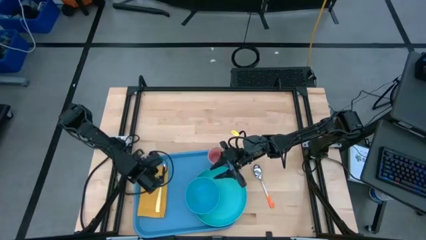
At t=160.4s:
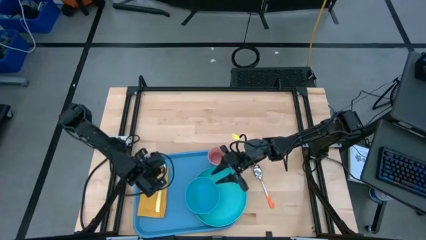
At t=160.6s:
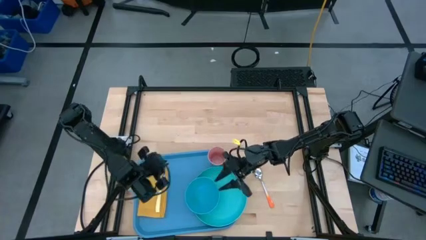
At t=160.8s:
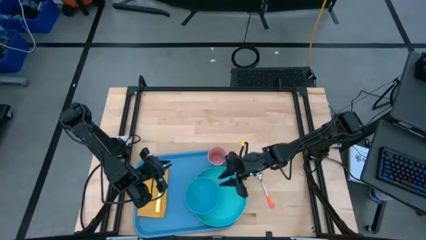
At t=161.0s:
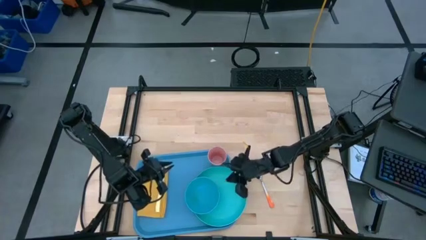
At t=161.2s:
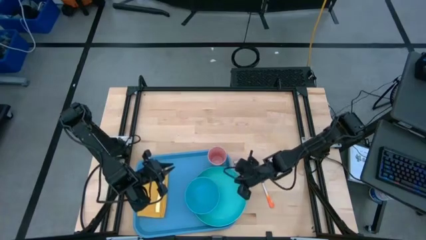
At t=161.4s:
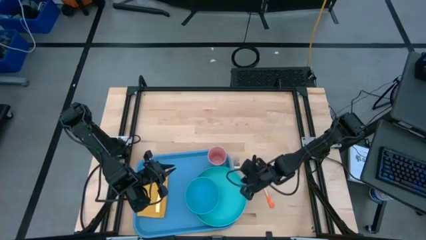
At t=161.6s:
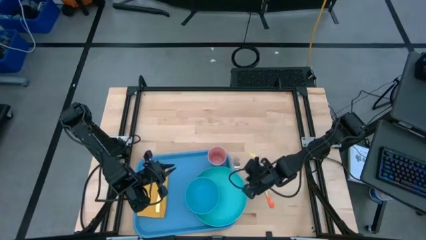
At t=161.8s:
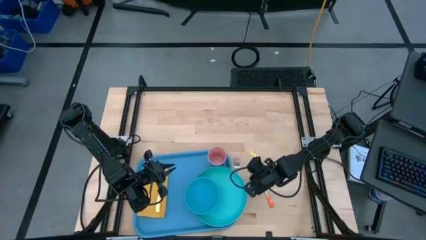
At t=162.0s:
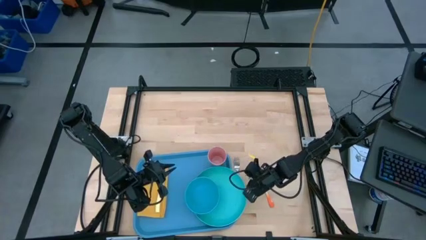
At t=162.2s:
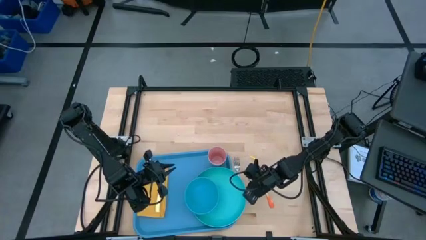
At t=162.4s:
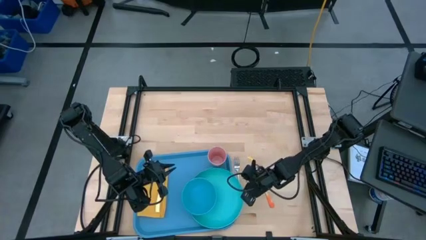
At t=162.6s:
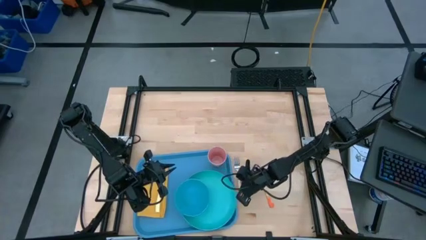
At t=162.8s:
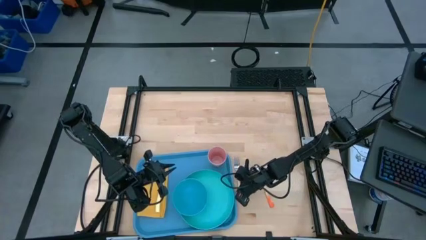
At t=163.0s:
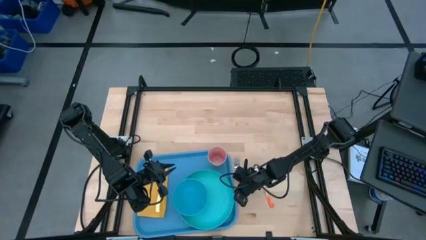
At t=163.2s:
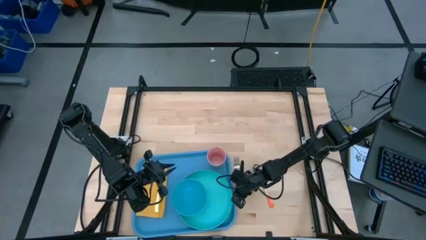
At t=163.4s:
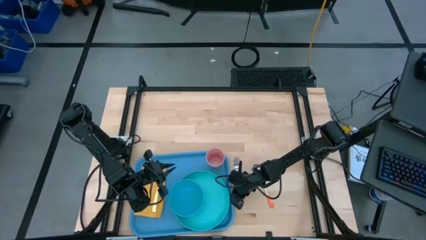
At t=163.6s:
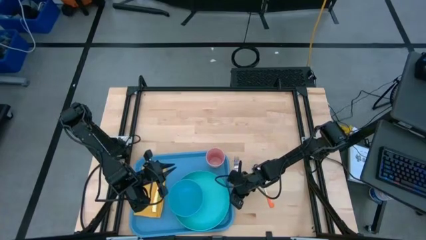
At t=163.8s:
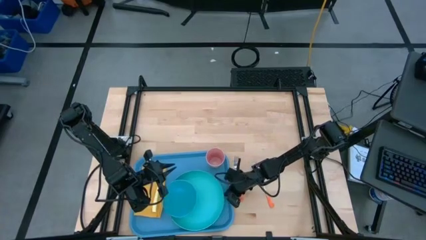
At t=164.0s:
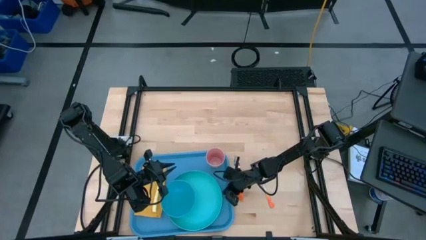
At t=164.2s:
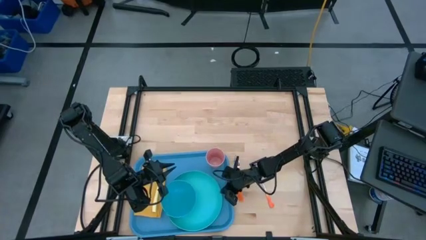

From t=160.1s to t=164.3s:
Task: Set up tray
Adjust the green plate on the blue tray

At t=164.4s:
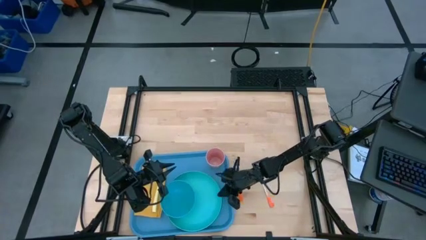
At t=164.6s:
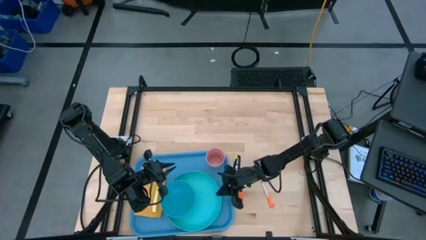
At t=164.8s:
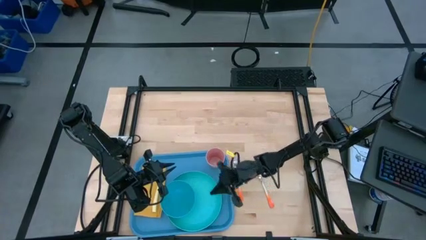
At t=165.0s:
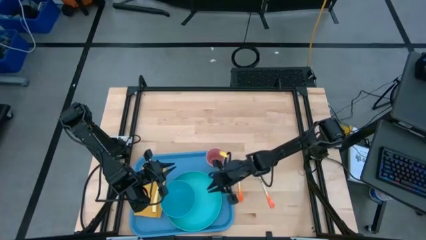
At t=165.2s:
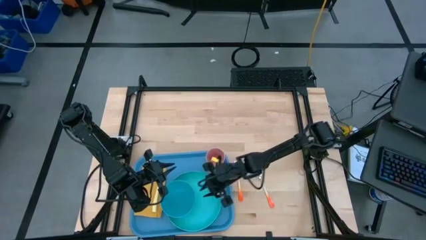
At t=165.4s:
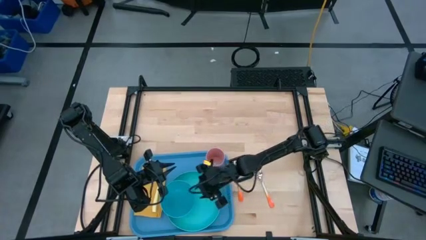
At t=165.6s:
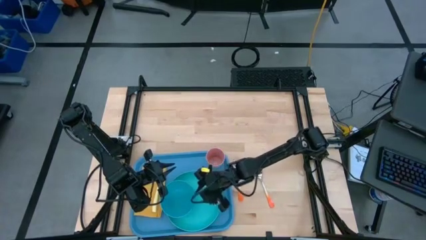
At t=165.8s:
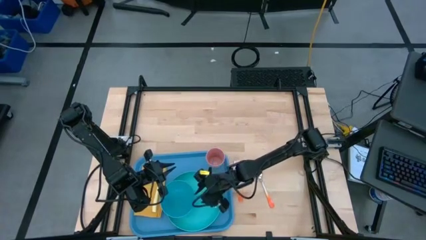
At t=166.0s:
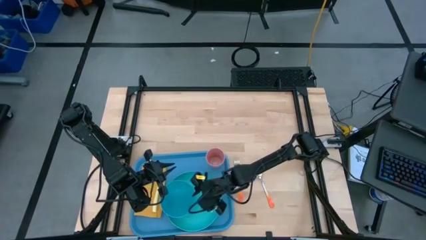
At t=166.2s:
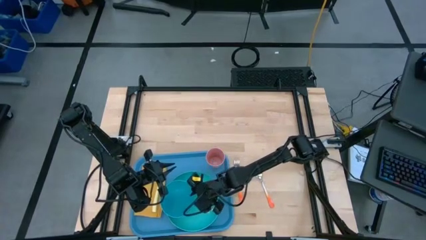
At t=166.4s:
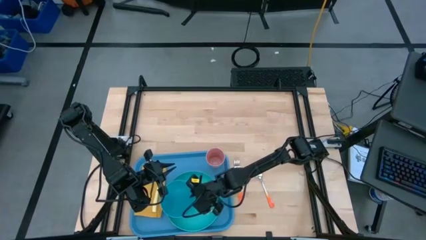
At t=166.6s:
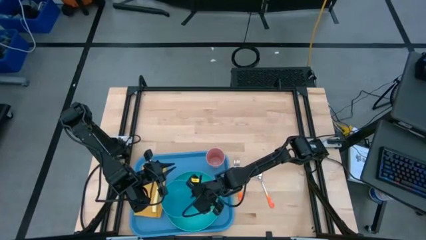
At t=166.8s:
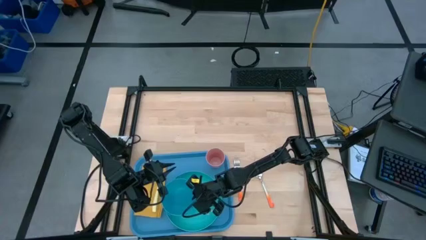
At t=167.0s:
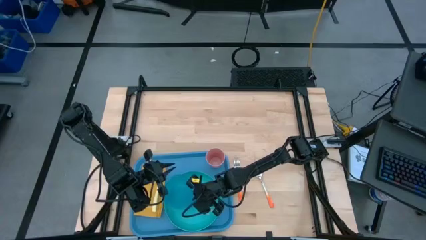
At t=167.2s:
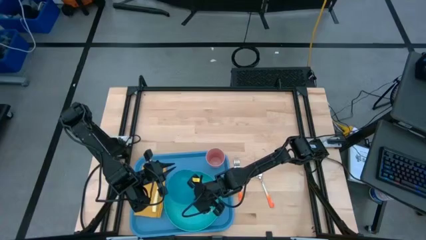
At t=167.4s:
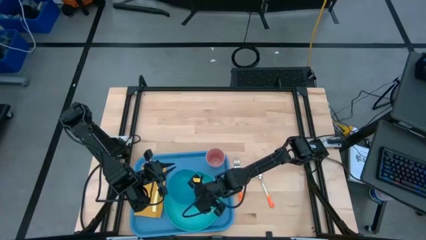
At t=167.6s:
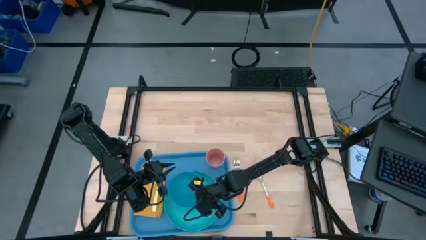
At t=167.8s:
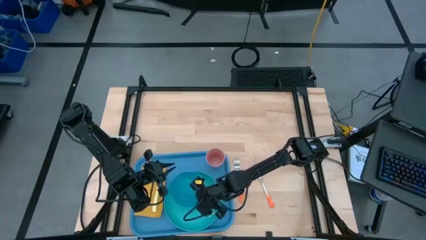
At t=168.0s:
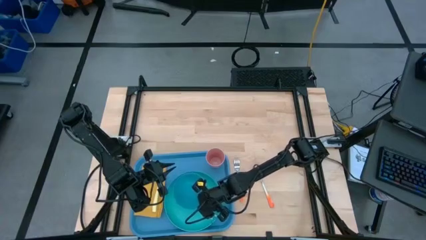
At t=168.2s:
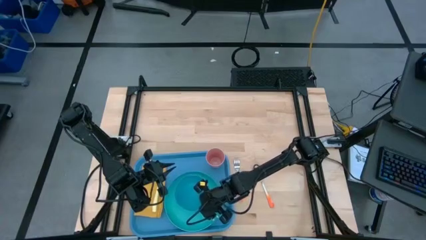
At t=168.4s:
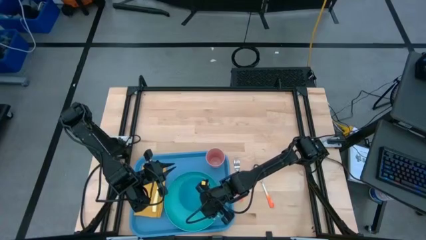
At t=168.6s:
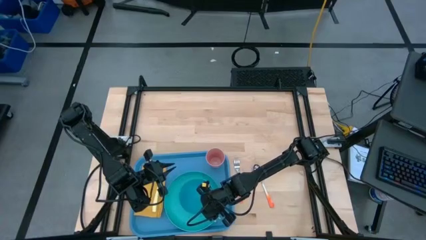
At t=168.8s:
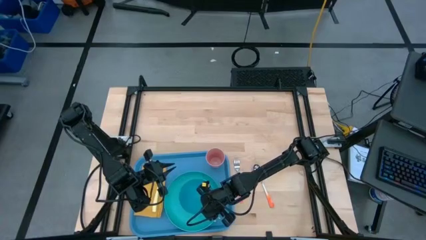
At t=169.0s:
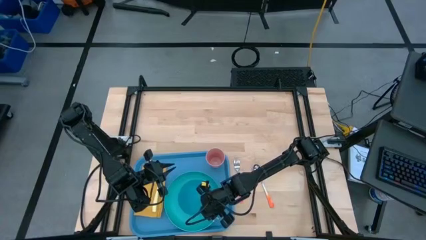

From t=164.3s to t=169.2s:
Adjust the blue bowl on top of the green plate on the blue tray

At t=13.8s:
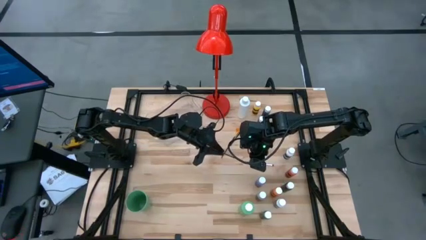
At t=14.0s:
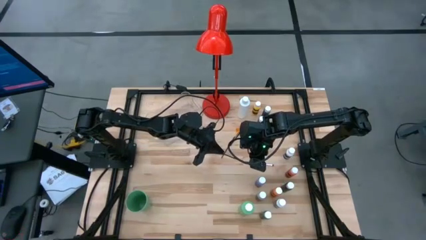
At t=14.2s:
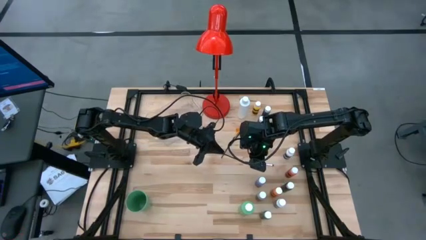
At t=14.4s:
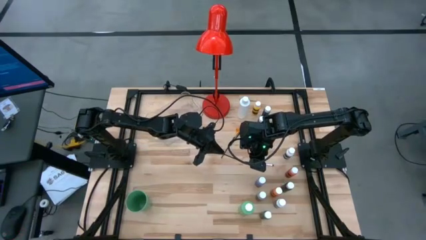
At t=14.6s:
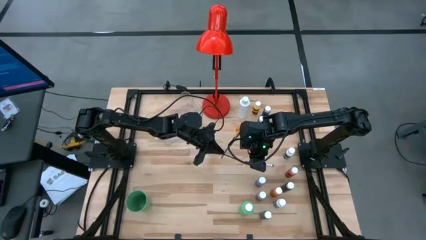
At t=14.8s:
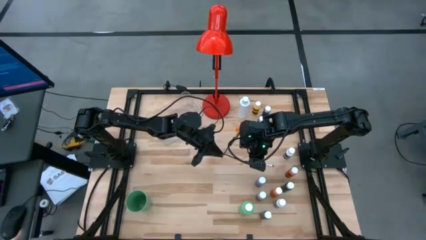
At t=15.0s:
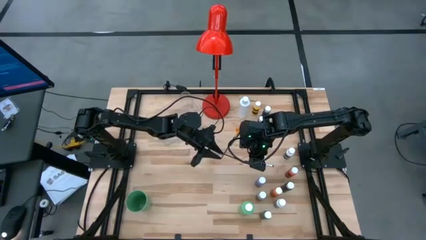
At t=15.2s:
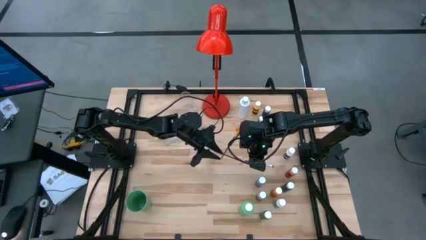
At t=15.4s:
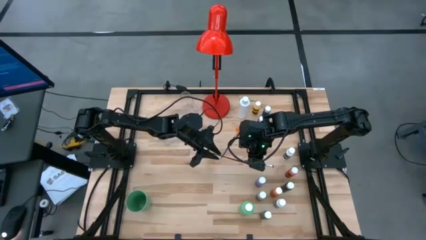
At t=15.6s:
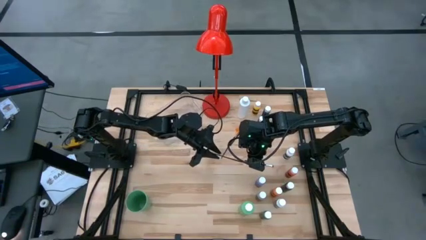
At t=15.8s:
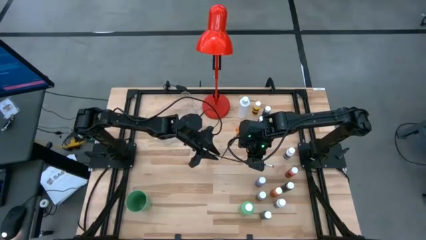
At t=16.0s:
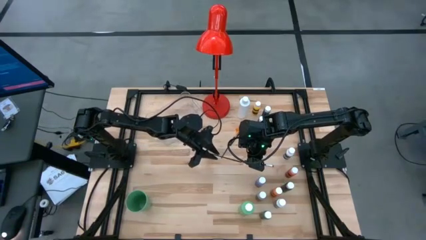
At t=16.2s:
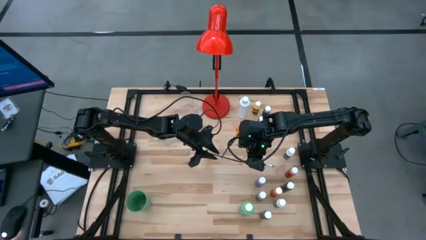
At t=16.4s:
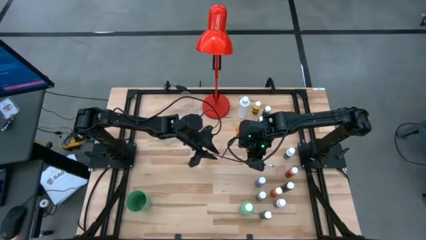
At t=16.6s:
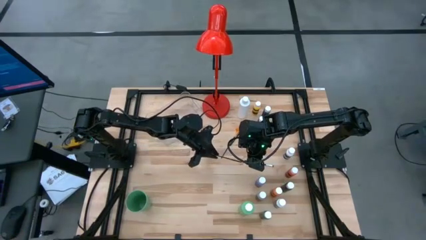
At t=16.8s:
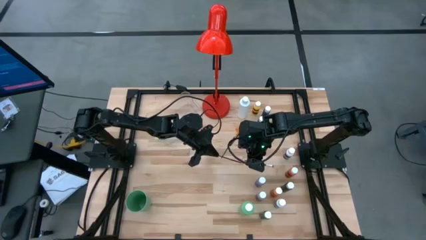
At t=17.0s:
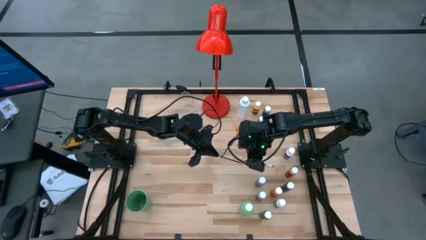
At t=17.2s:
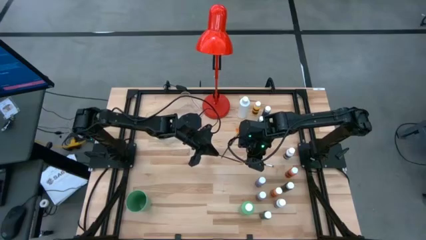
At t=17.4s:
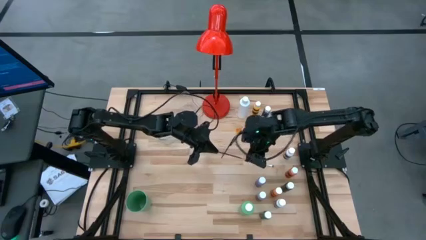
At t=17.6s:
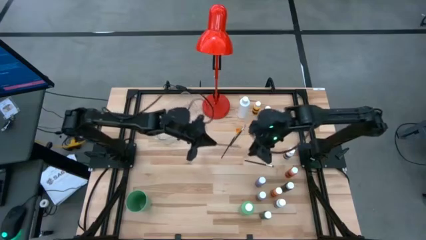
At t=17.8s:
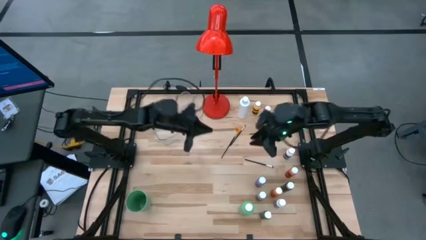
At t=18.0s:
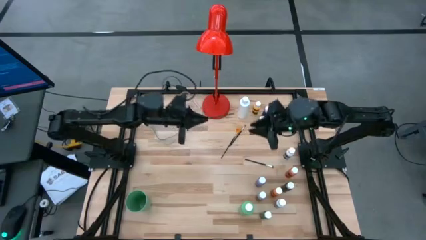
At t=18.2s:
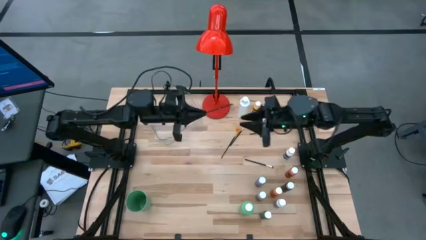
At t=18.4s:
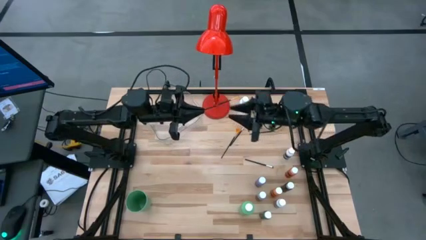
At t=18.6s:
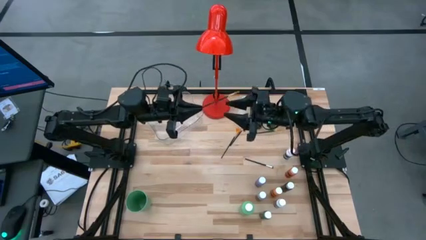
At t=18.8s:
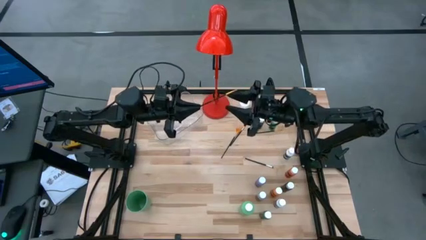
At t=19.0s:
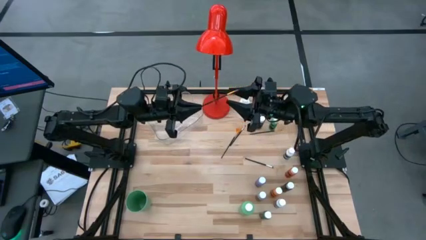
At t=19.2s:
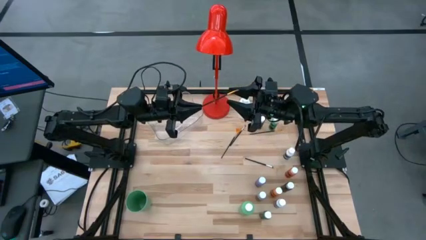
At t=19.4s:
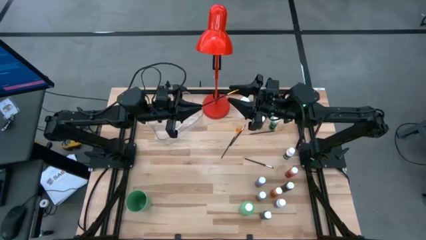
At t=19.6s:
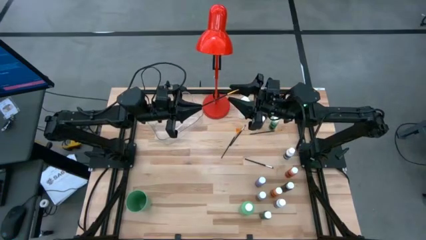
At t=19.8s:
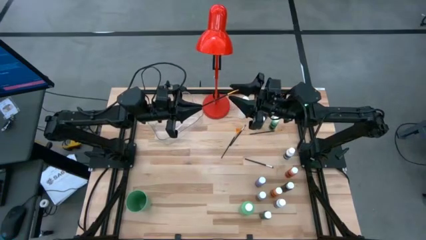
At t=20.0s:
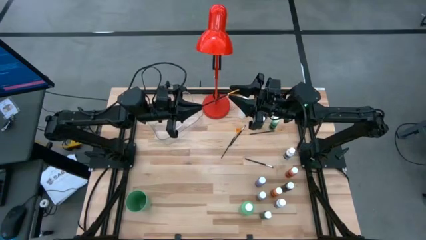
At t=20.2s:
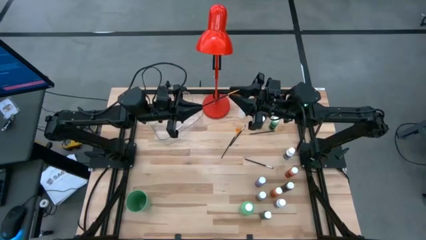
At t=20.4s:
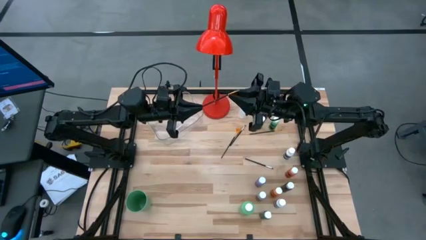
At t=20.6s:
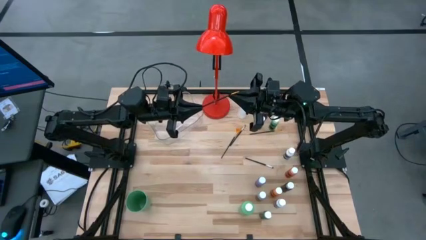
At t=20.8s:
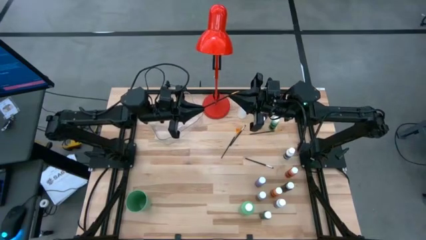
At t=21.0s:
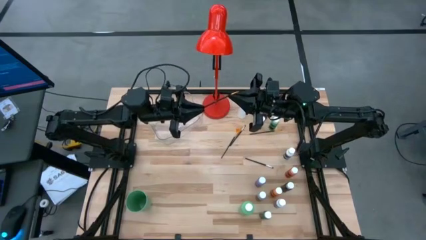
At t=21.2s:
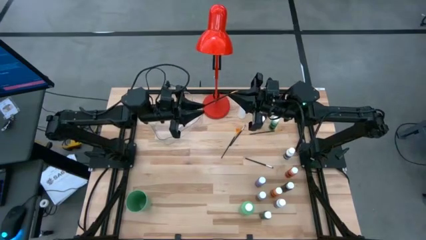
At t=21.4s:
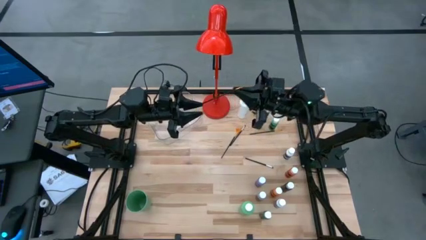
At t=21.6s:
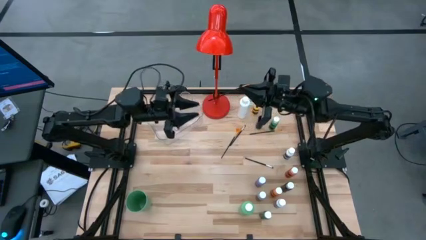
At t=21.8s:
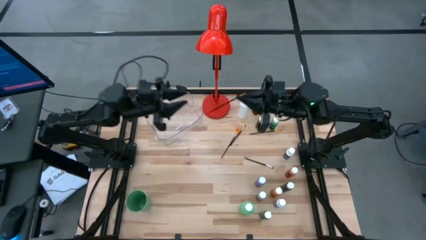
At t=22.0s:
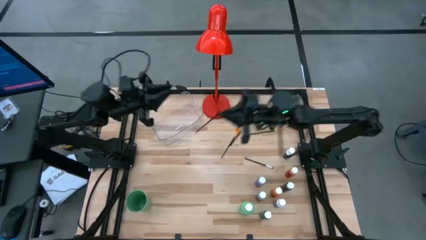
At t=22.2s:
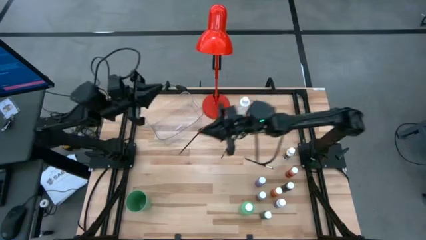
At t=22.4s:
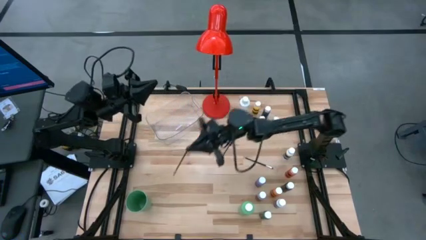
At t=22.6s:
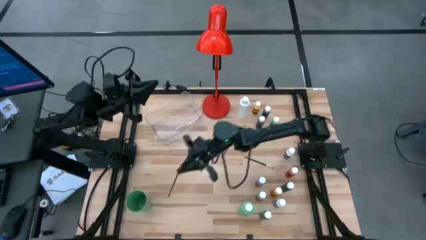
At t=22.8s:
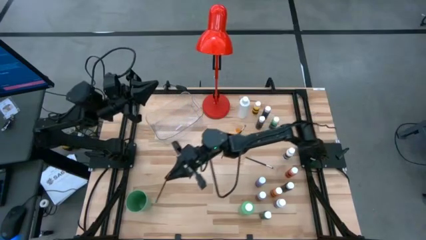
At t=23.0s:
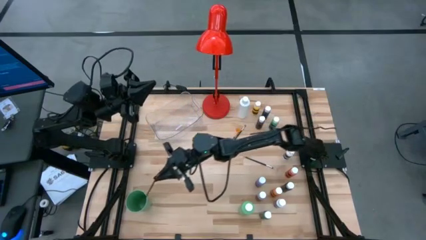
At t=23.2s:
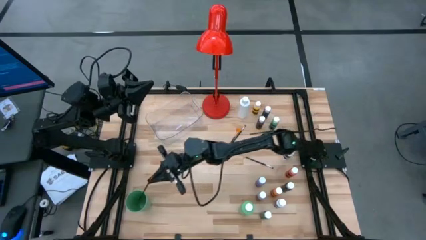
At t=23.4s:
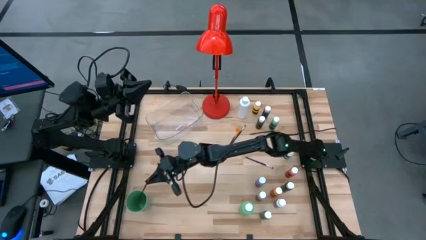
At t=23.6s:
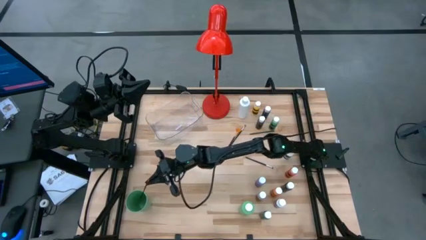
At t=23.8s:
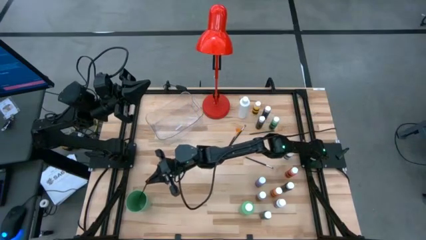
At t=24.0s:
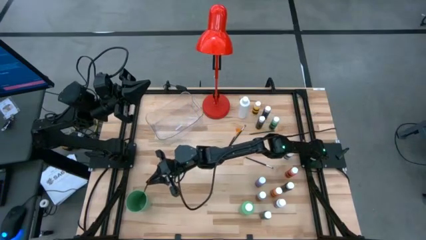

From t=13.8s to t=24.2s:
Task: Pick & Place Paint Supplies
Put the black paintbrush into the green cup
